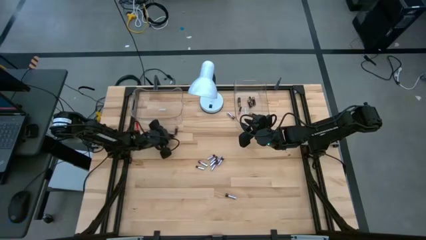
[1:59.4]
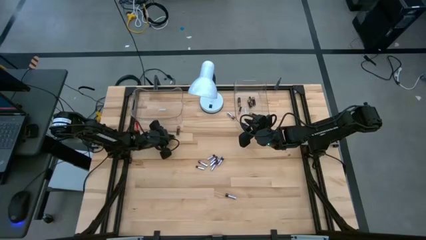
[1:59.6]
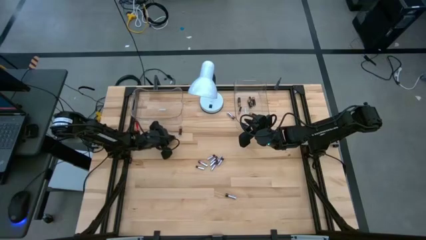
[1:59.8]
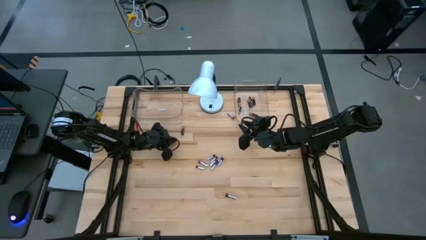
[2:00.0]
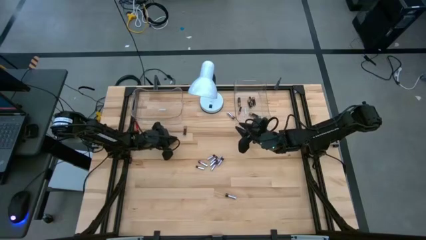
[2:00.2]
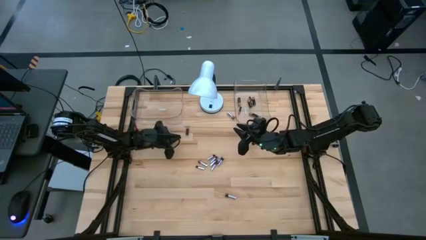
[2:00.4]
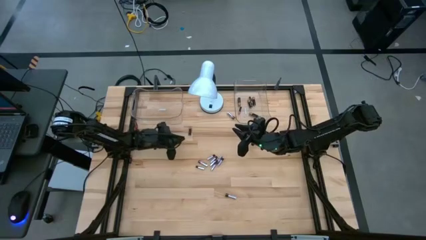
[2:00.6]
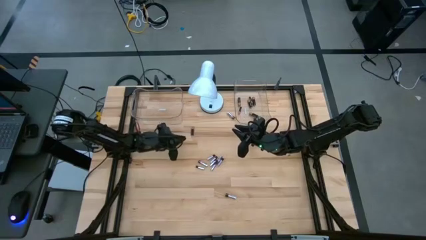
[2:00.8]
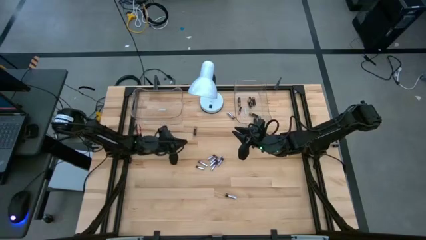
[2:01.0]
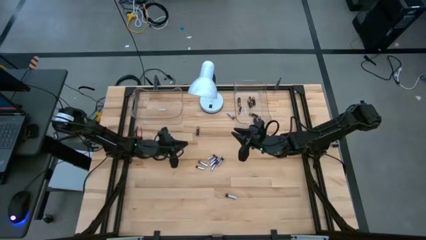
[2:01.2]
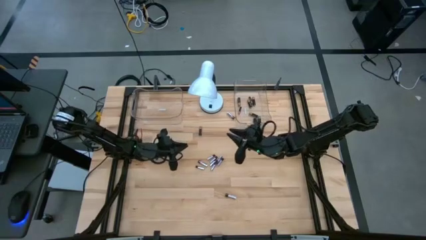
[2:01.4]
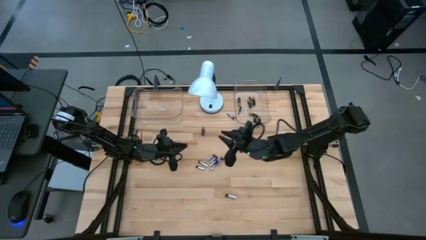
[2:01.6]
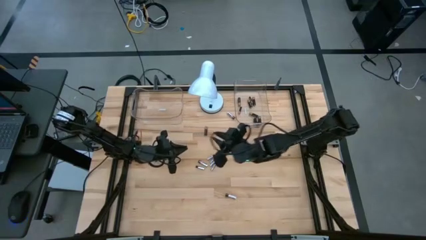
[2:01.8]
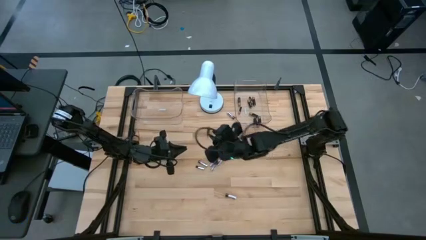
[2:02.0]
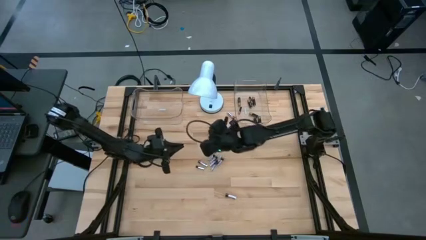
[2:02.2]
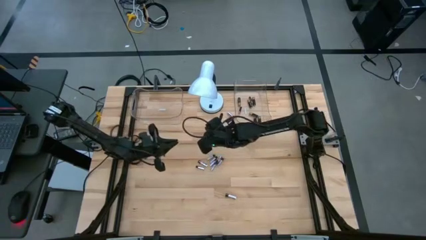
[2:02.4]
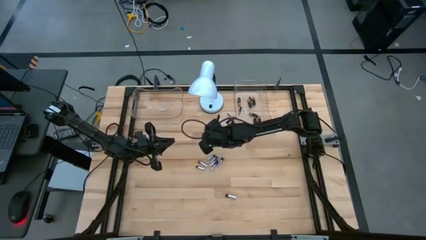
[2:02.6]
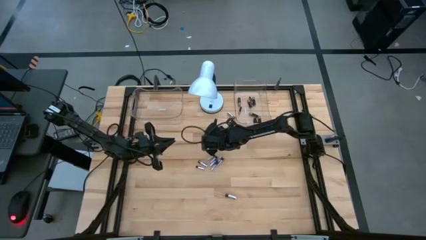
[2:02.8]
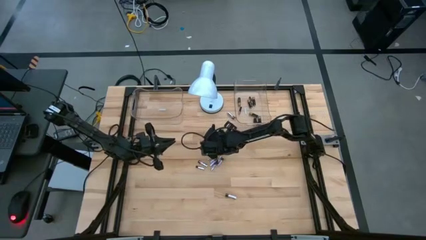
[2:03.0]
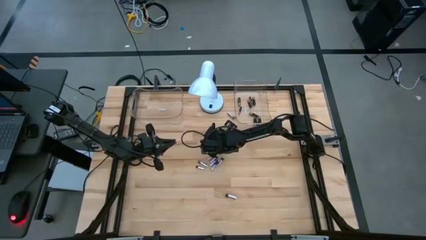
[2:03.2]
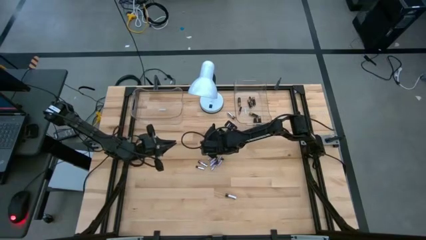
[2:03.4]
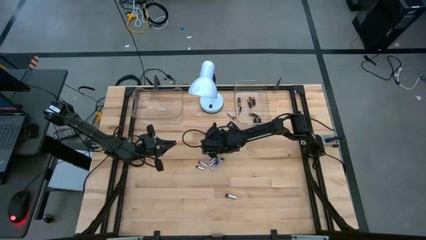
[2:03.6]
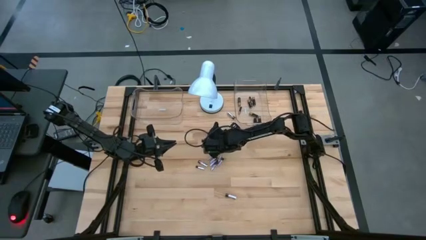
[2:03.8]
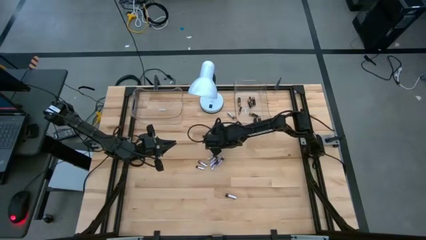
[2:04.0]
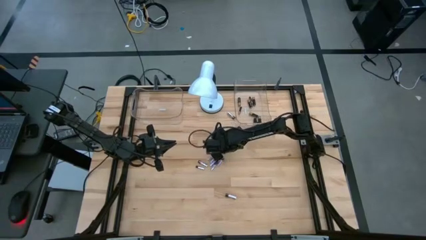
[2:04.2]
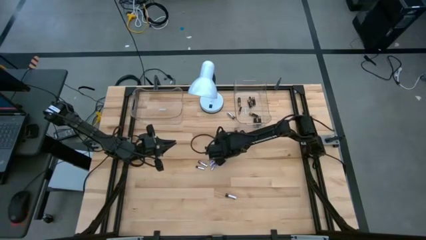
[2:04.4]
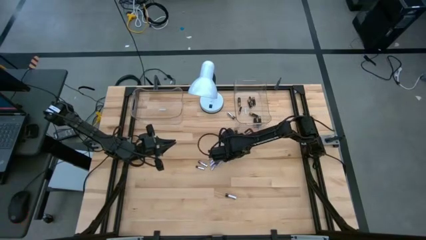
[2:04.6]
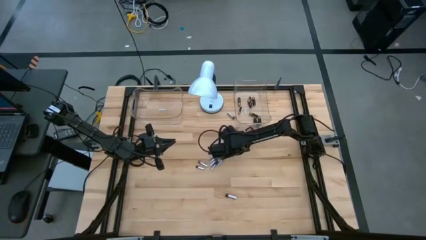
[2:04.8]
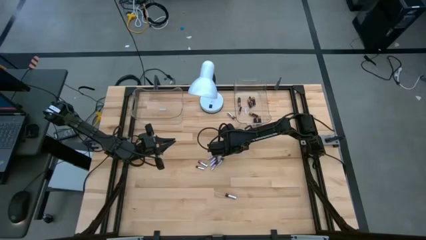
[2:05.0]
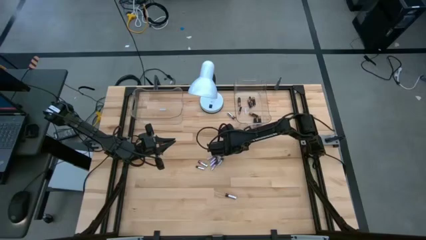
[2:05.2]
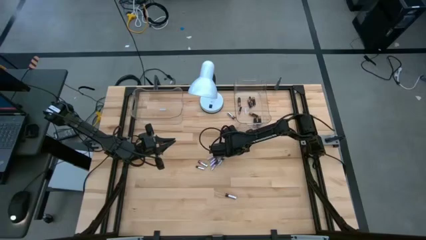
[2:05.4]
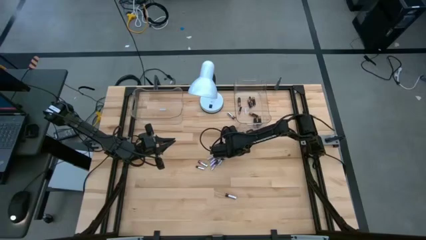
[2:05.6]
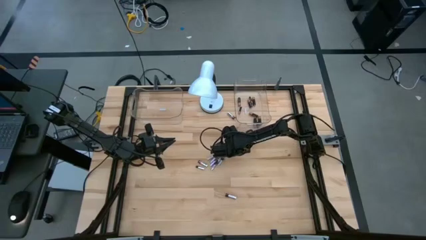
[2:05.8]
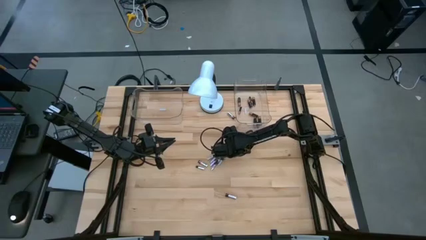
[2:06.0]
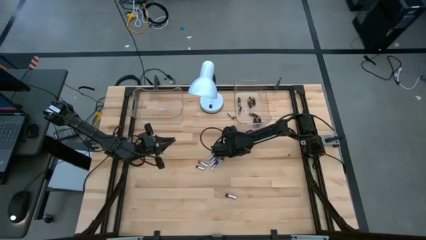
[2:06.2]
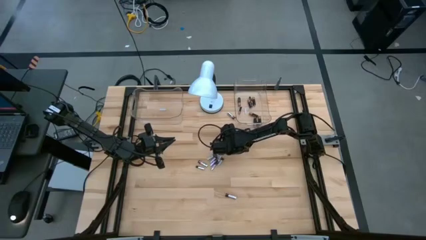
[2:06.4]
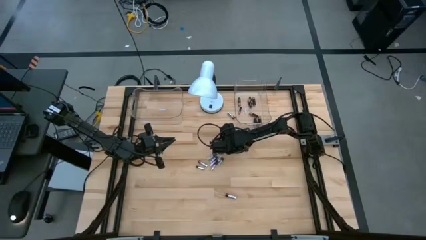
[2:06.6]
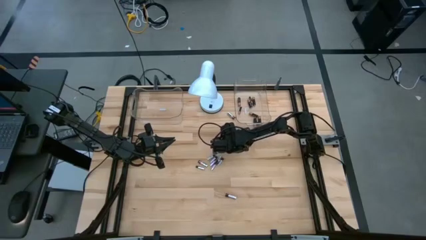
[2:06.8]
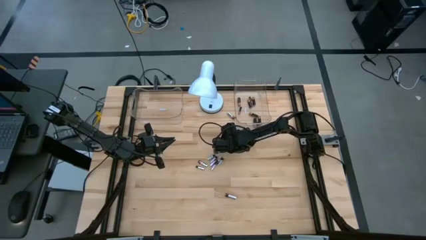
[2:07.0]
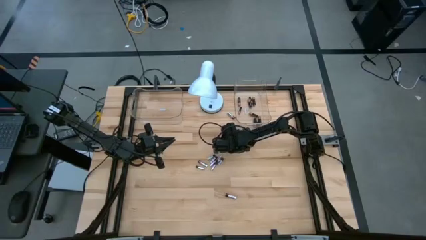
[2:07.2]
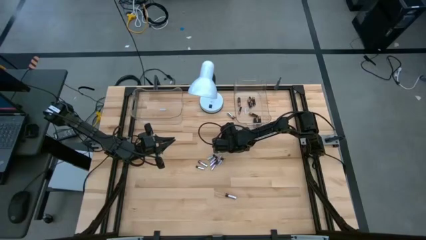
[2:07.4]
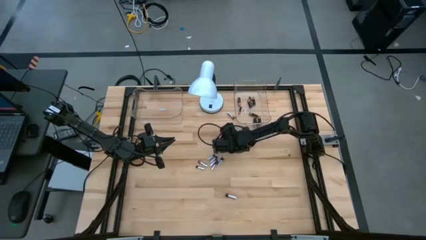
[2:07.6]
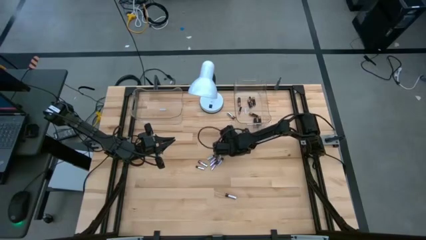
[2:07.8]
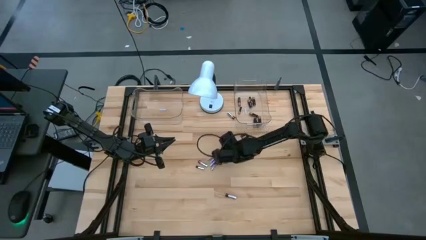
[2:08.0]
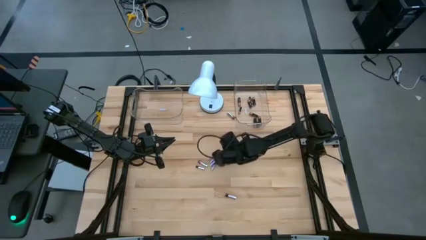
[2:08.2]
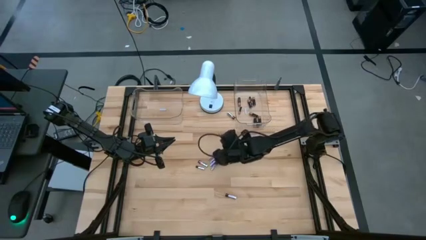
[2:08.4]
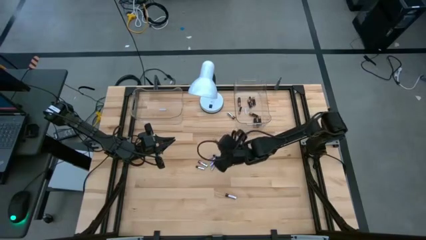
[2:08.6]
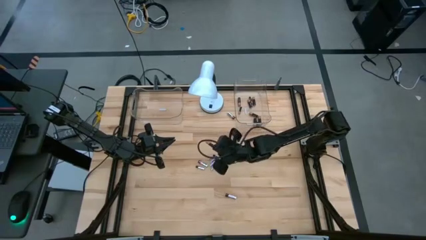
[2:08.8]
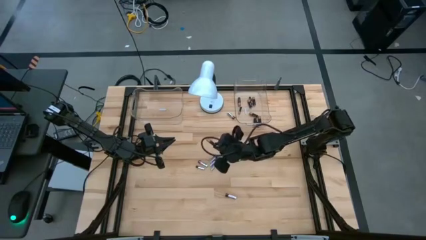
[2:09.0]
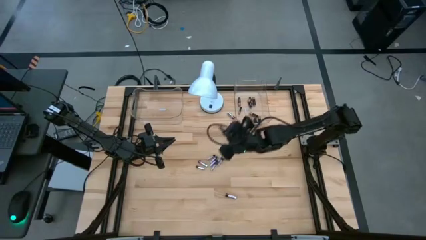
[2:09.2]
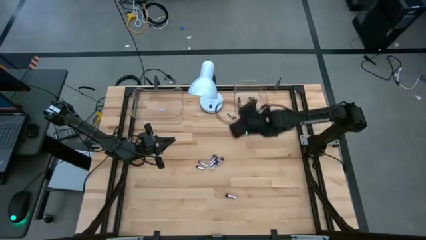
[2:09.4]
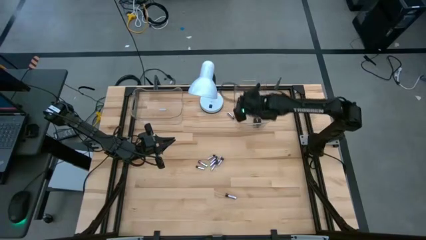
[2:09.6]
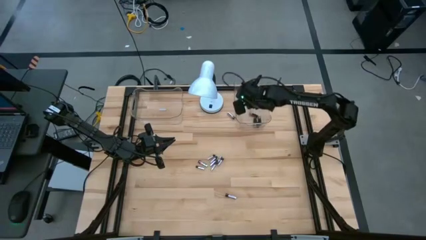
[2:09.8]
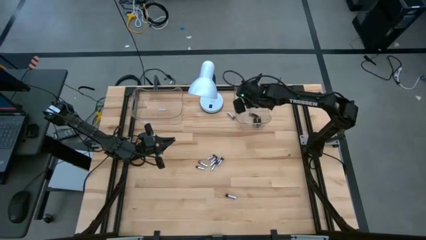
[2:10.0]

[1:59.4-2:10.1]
Task: Sort batteries
Put the black battery in the transparent bin

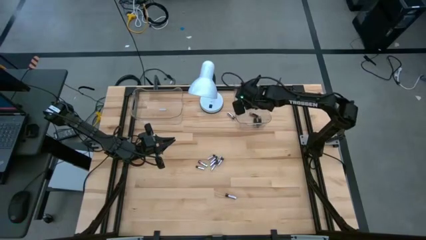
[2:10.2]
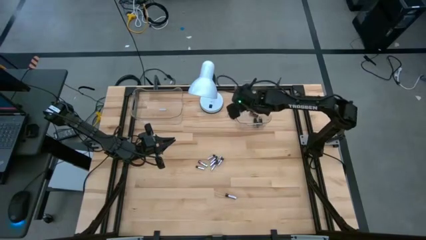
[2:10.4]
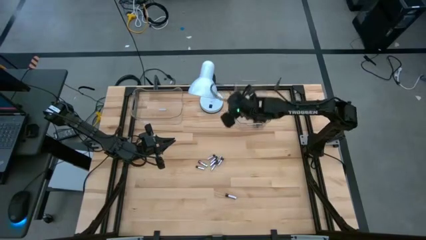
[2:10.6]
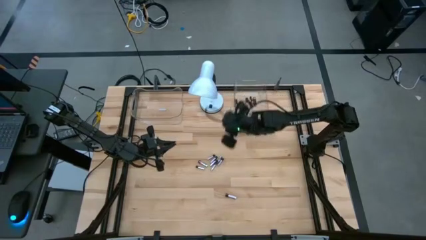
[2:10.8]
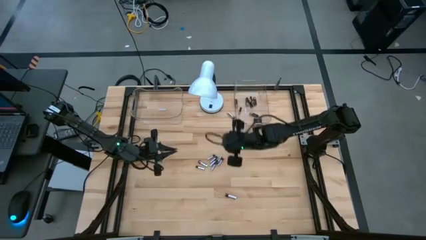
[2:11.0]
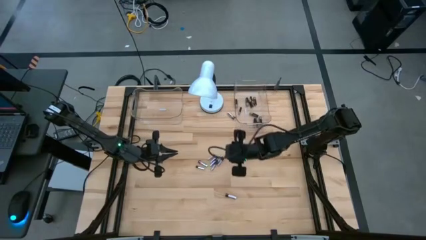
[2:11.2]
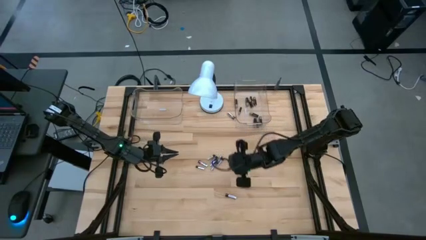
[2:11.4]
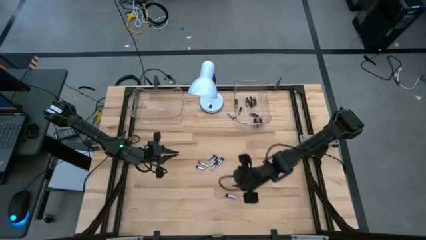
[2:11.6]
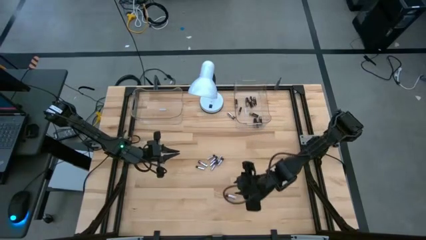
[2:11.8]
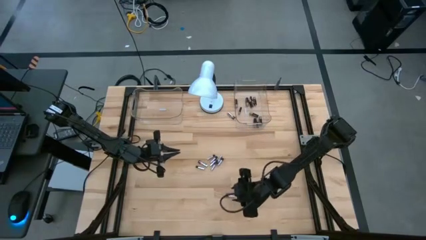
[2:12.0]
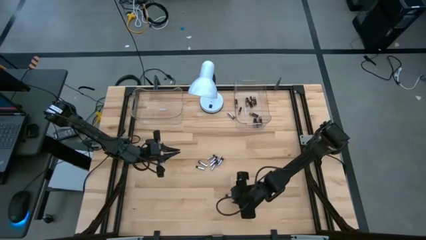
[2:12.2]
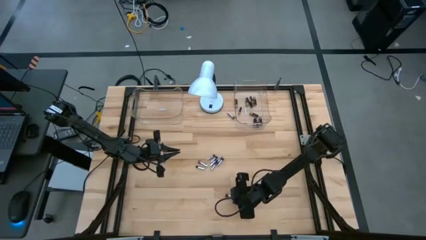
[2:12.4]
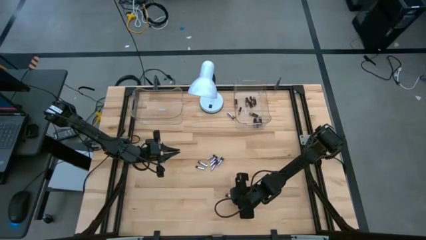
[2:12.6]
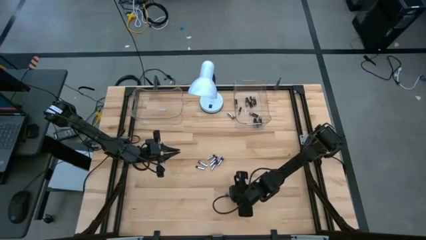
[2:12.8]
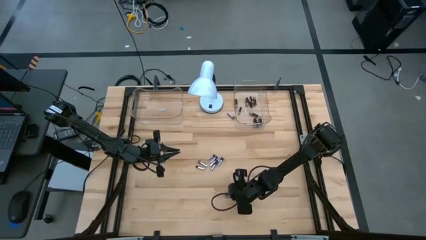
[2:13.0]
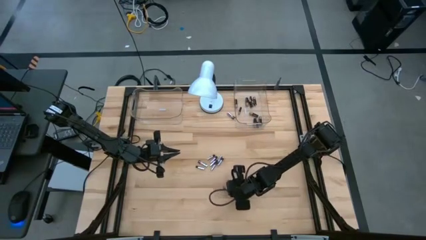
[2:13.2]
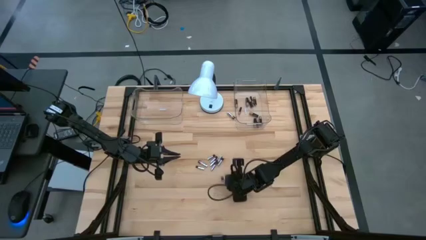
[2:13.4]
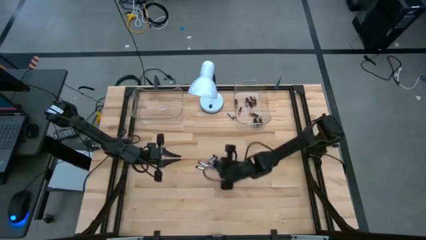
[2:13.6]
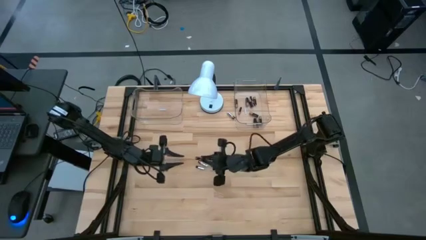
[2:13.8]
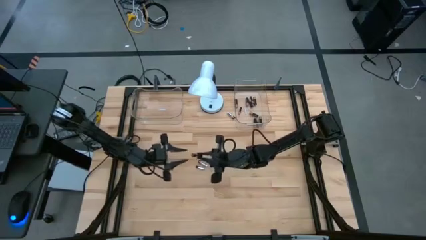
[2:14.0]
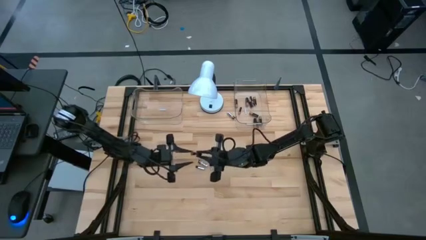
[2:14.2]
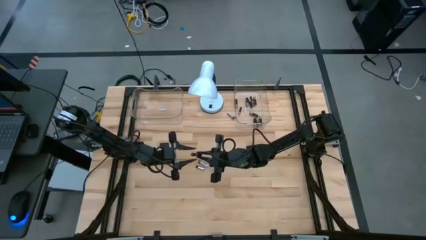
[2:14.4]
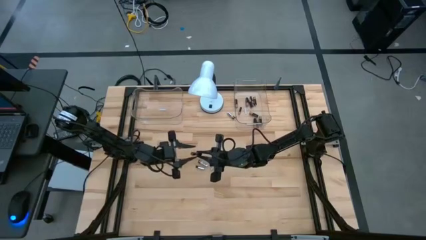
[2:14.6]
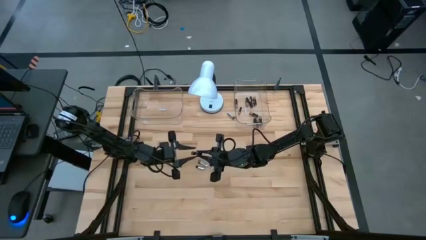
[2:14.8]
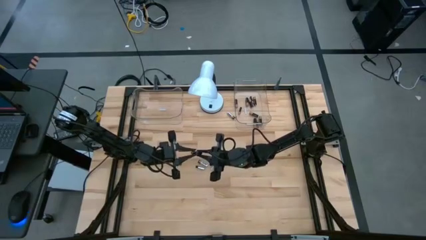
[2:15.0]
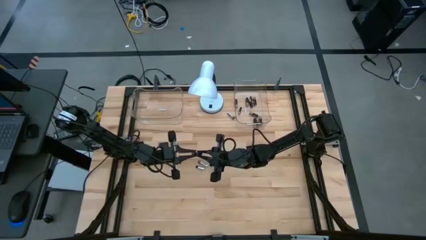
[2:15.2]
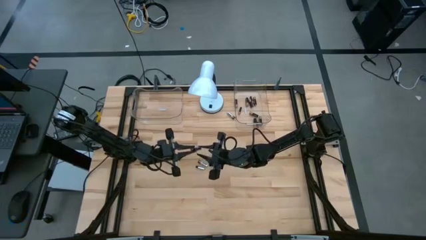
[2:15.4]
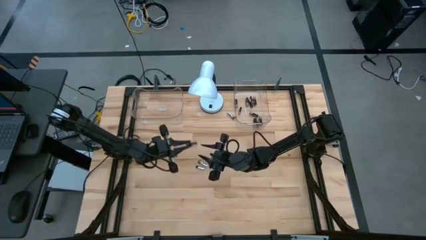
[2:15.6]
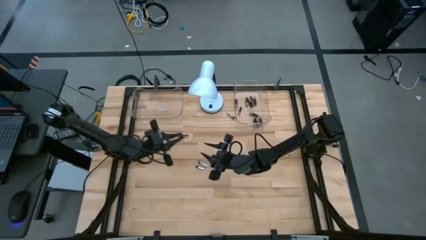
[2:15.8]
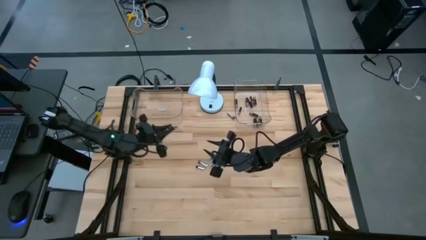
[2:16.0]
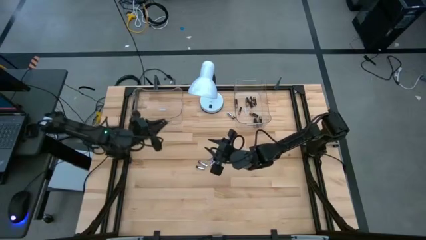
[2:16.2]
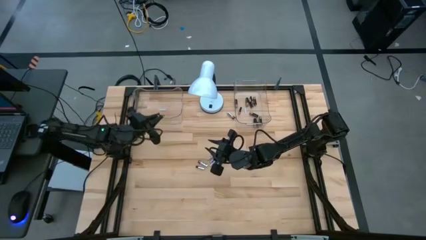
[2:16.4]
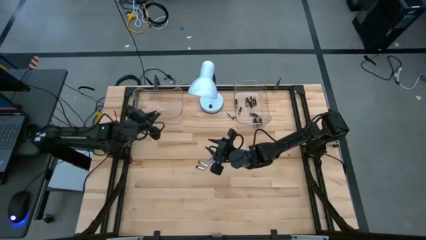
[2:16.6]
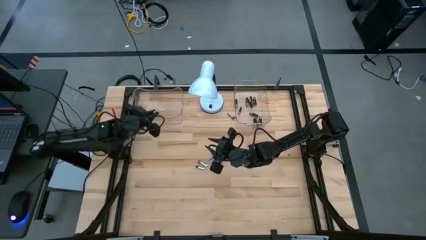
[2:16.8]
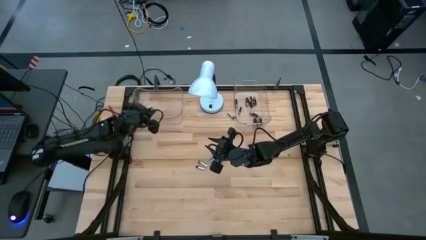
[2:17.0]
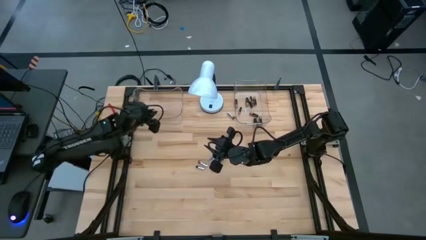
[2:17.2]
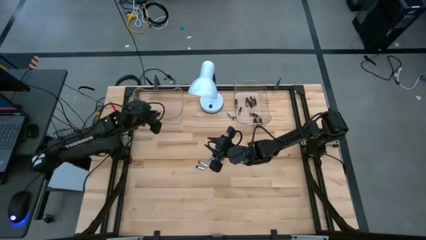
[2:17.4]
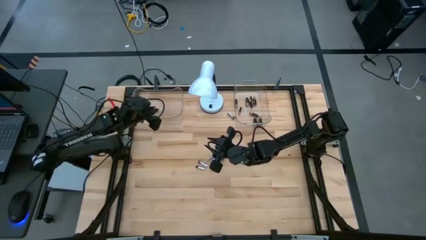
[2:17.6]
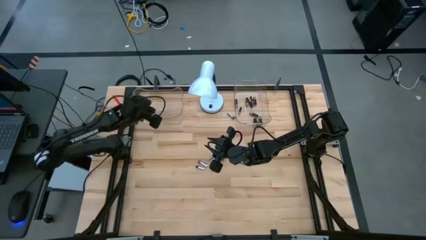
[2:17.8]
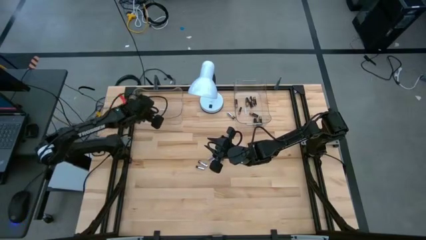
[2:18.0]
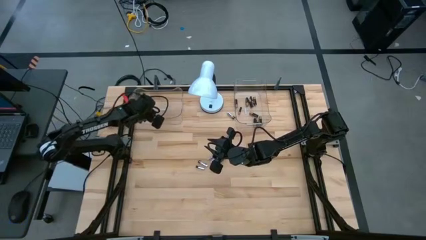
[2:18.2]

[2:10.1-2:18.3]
Put the black battery in the transparent bin
